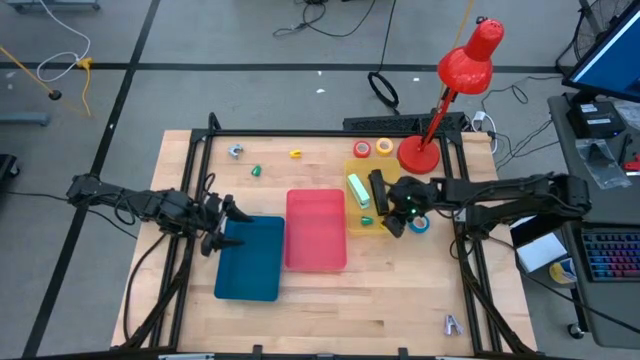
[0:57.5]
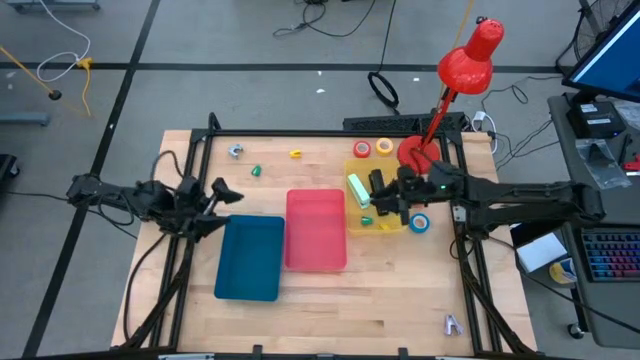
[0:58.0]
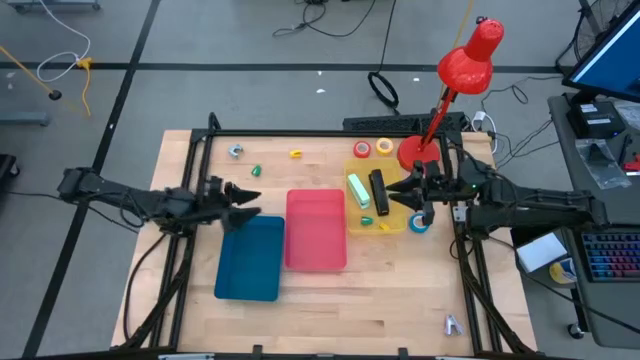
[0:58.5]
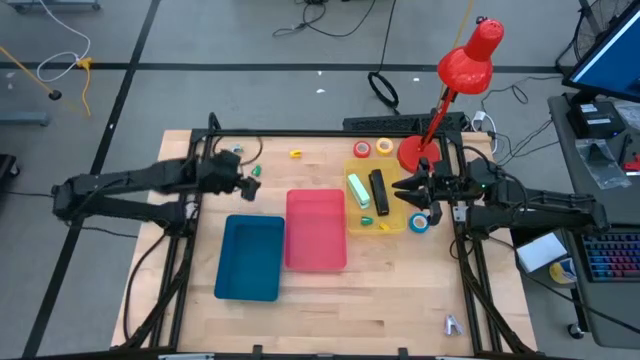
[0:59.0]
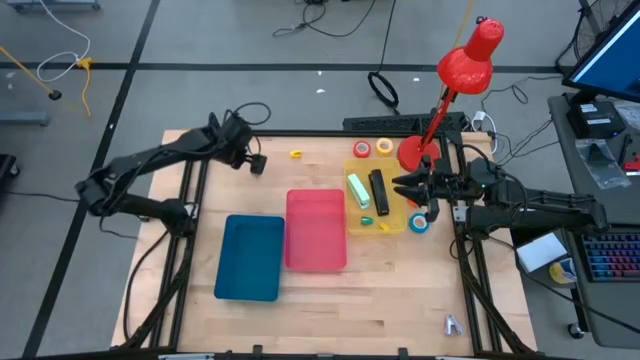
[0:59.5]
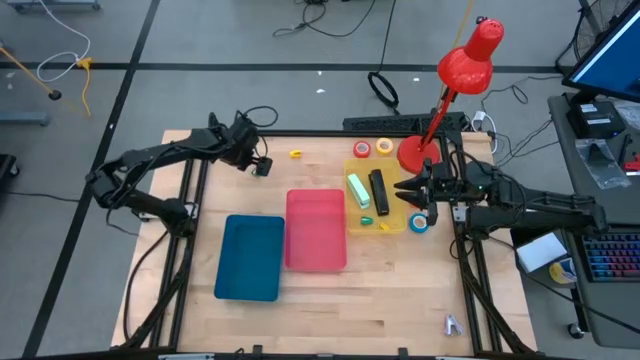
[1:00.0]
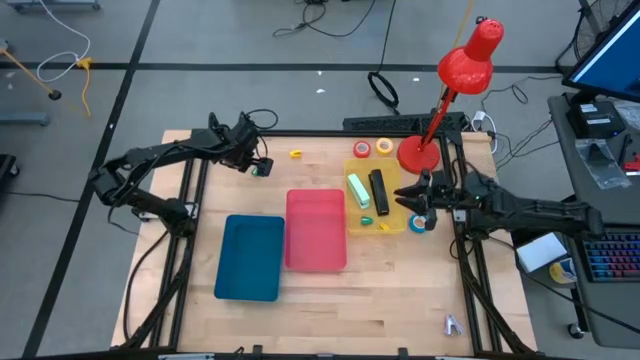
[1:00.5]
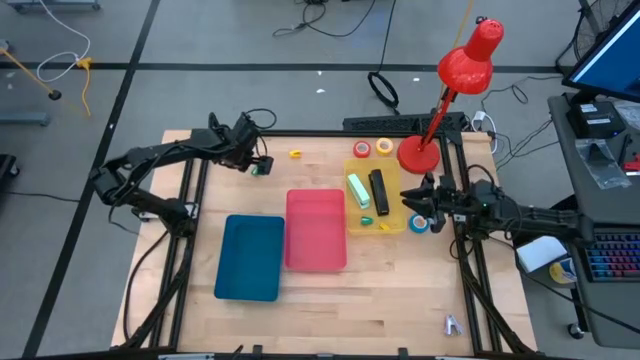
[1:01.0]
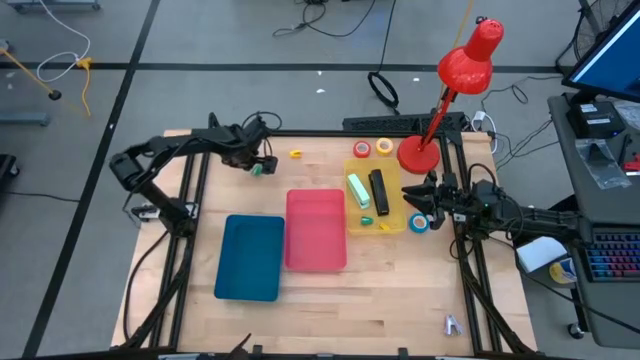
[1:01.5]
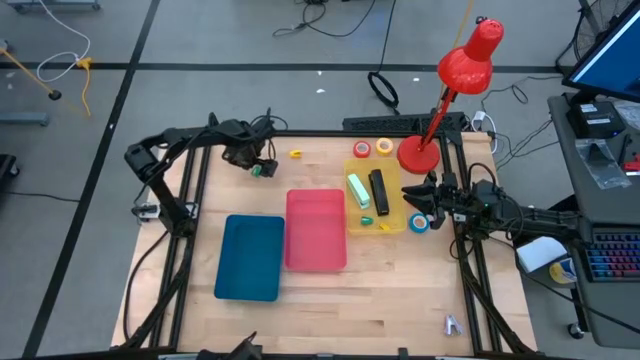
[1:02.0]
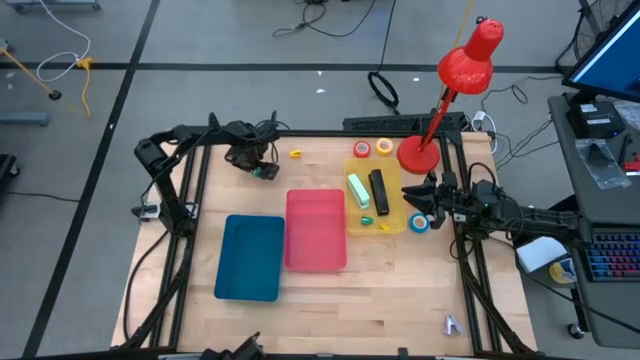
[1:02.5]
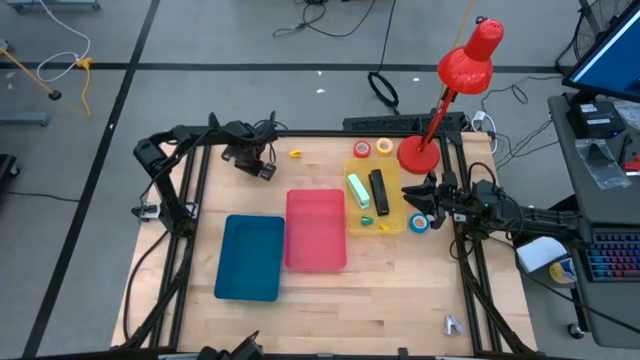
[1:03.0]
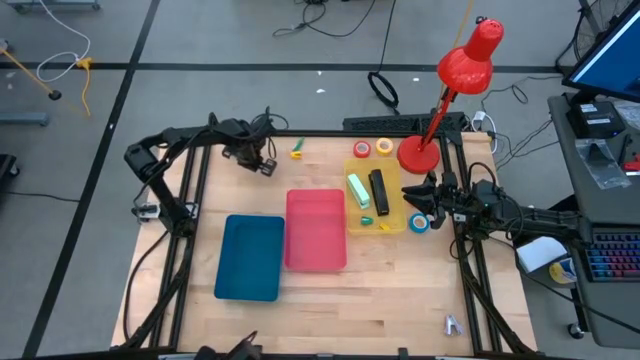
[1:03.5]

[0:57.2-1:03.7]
Task: Pick and place Stapler, Stapler remover, tape
Put the green stapler into the yellow bin

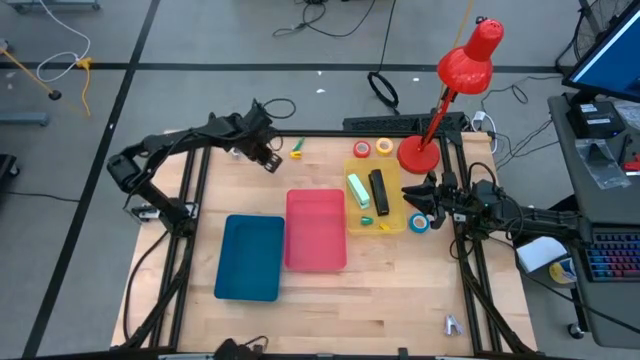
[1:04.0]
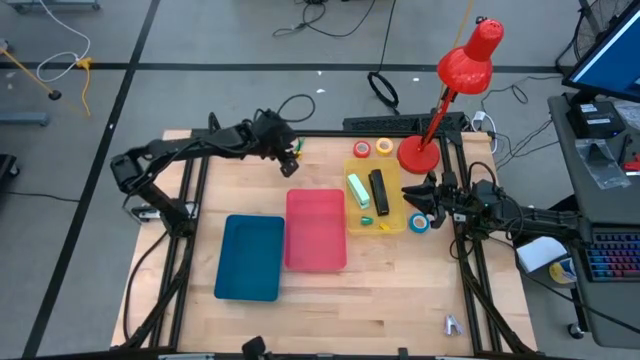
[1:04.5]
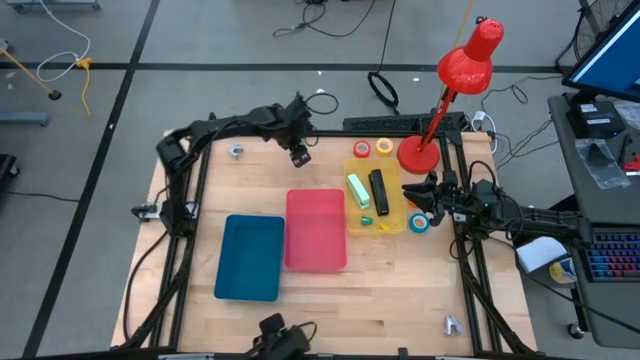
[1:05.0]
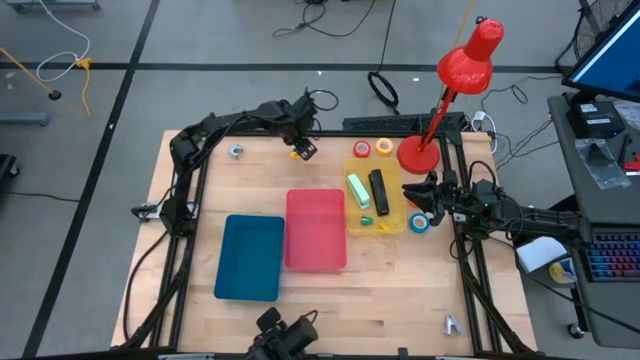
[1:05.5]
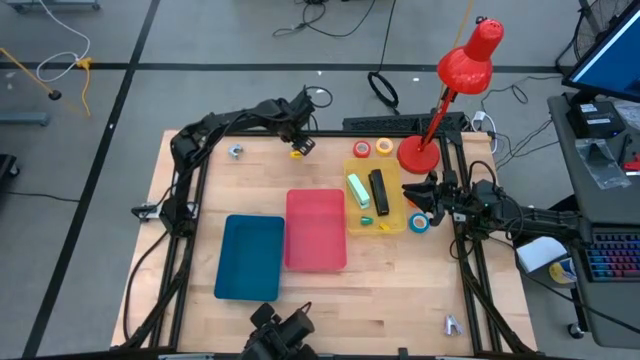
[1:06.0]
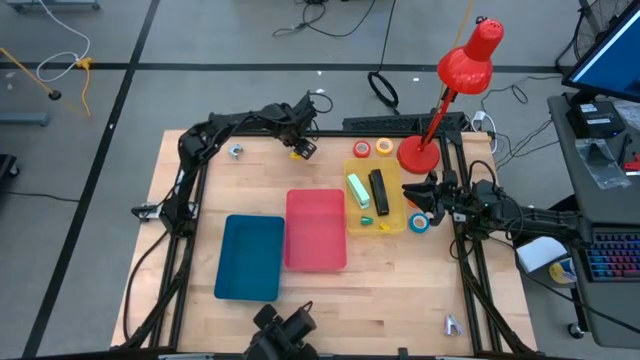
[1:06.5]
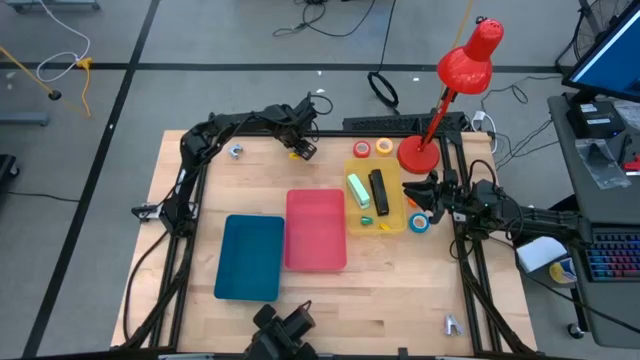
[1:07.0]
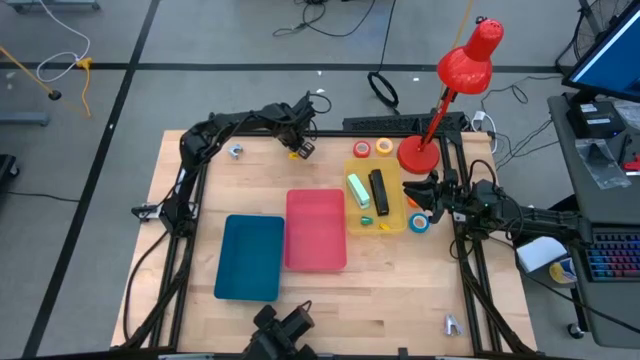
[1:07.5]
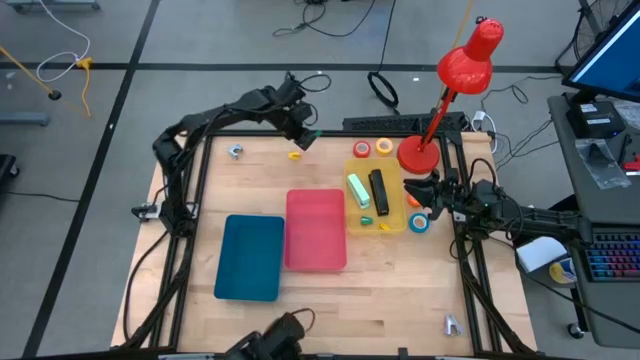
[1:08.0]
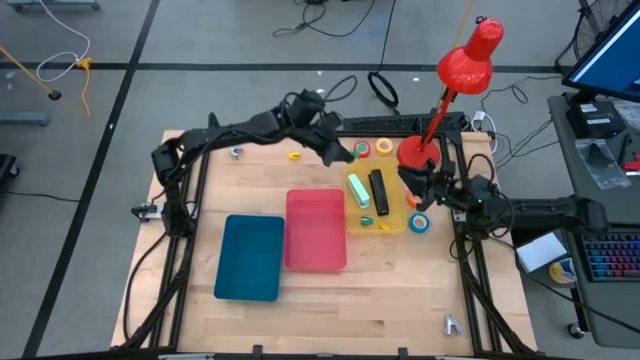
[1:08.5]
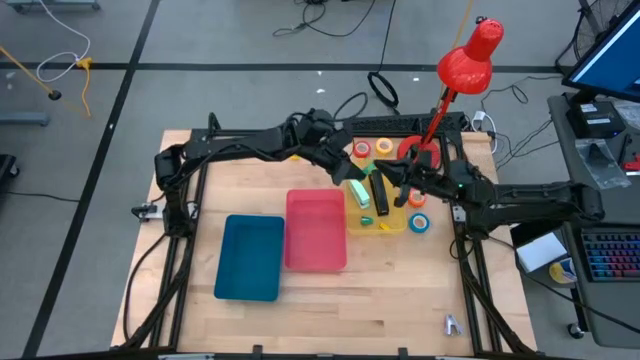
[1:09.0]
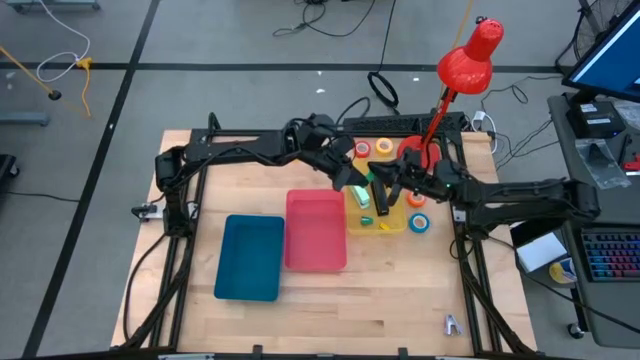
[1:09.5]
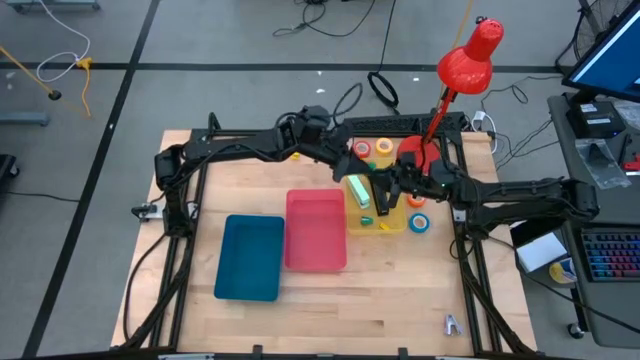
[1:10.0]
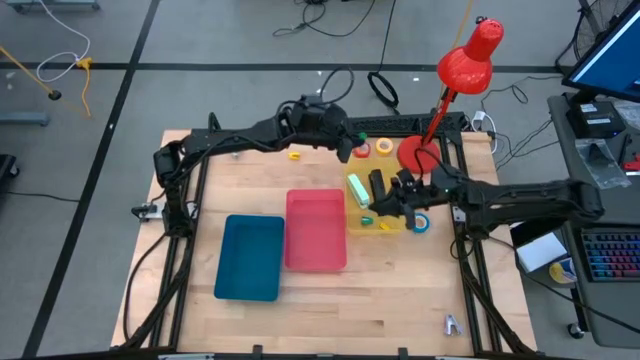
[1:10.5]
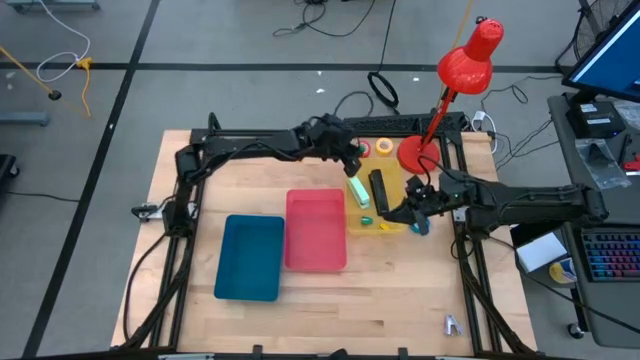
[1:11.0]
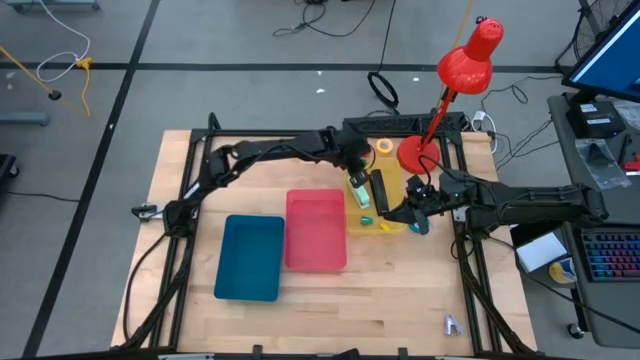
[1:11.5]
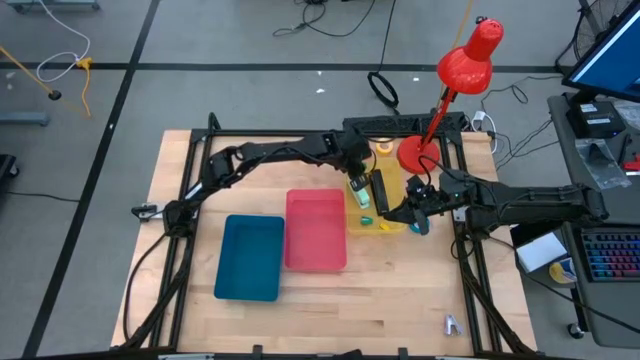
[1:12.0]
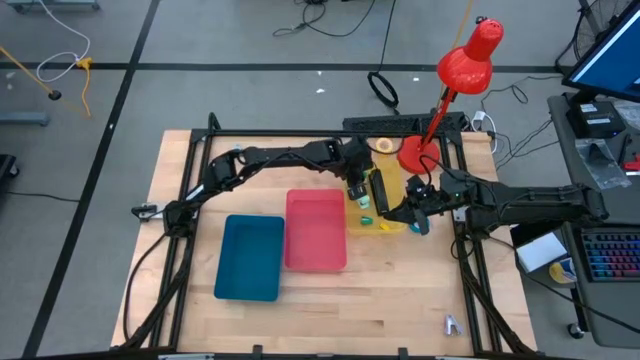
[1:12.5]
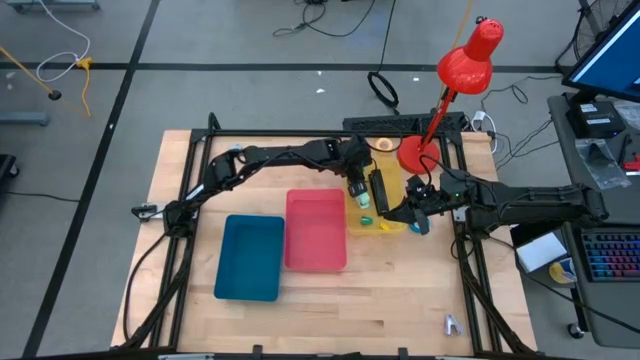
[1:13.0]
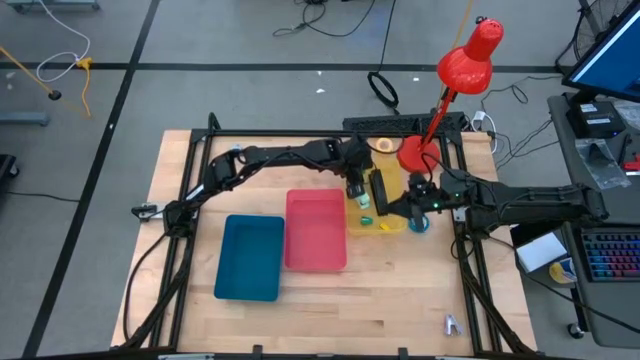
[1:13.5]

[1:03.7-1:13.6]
Put the green stapler into the yellow bin

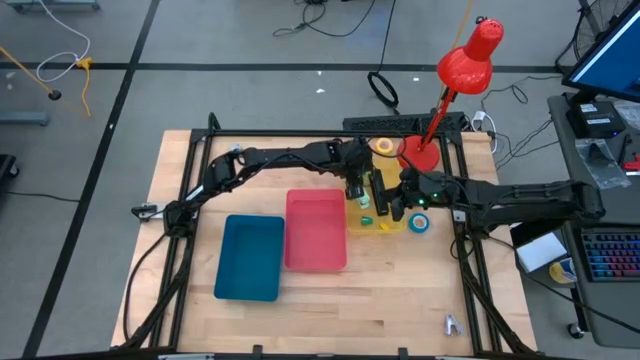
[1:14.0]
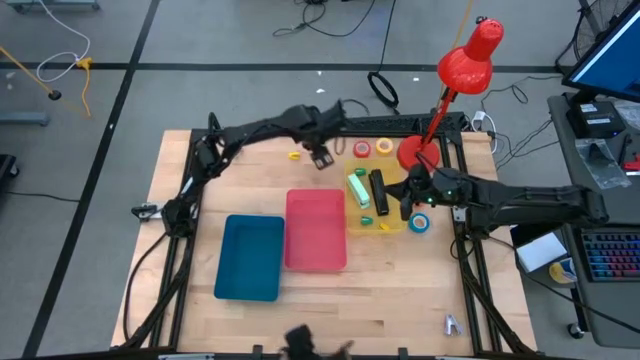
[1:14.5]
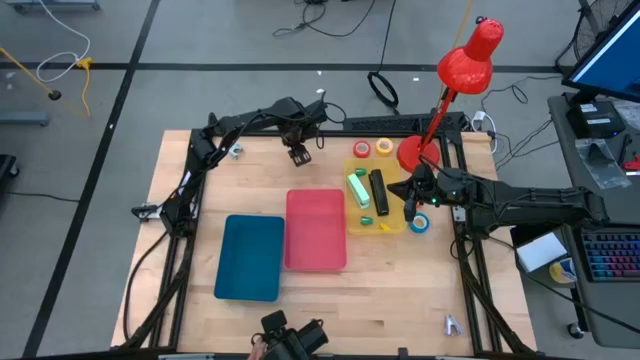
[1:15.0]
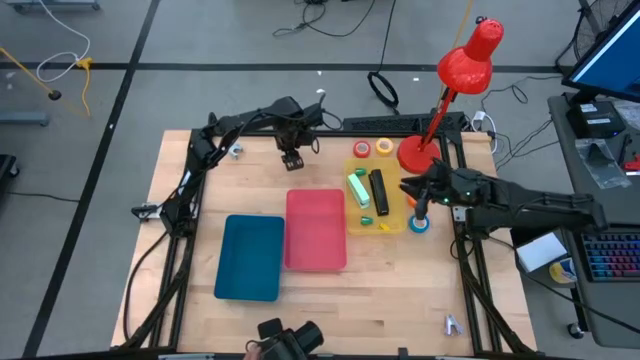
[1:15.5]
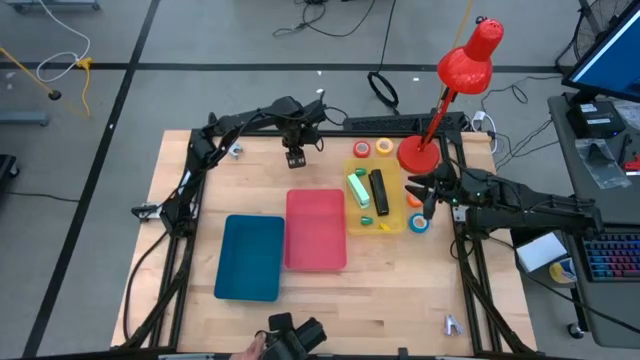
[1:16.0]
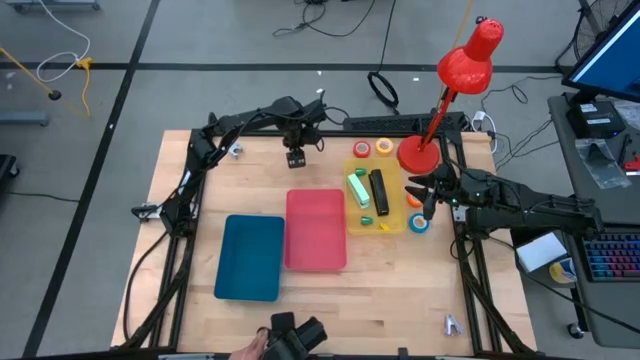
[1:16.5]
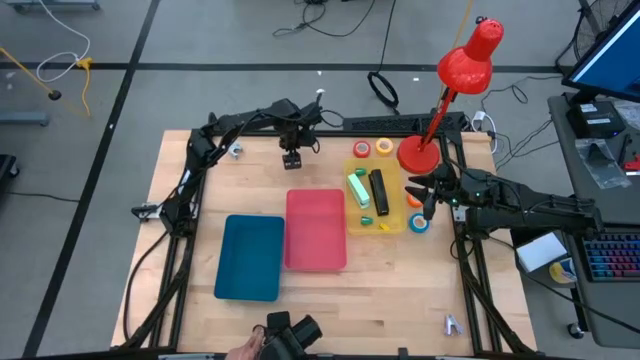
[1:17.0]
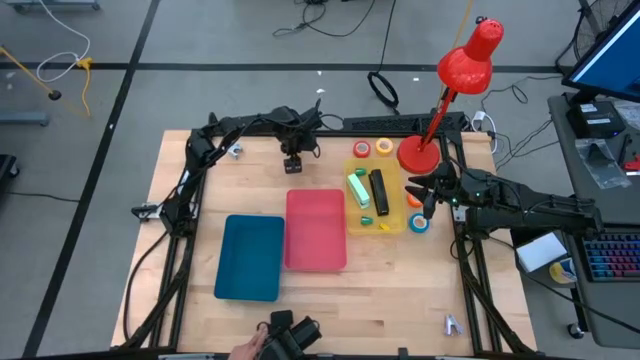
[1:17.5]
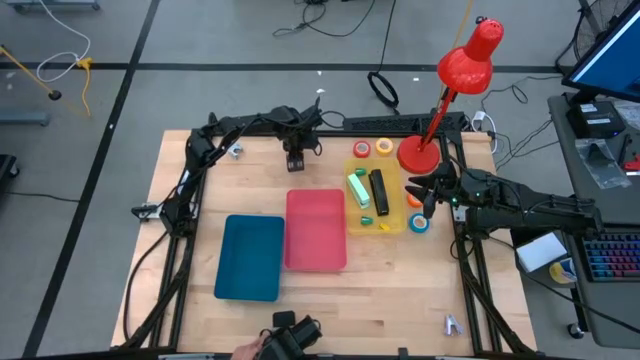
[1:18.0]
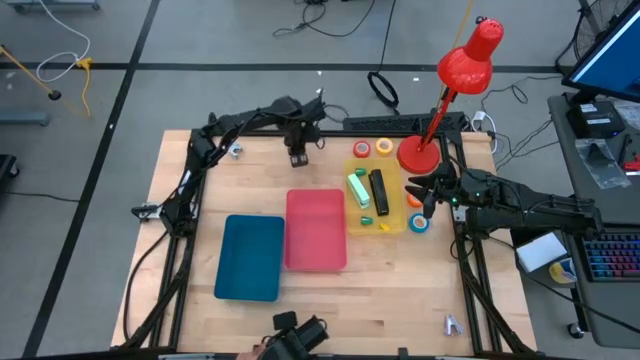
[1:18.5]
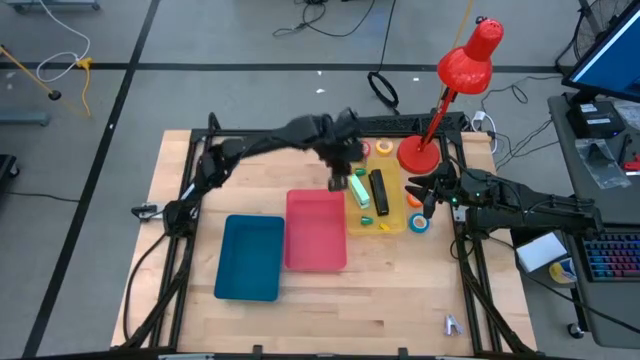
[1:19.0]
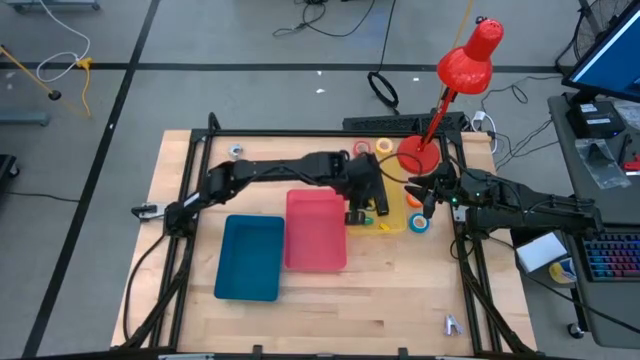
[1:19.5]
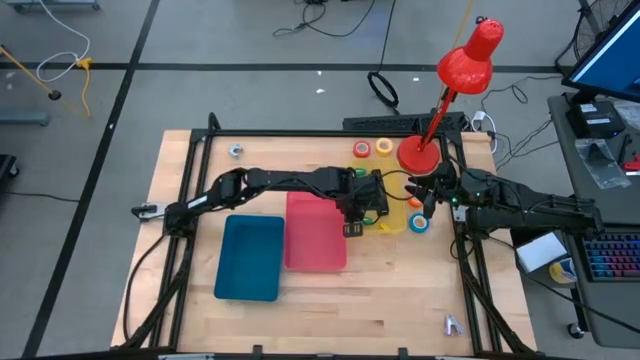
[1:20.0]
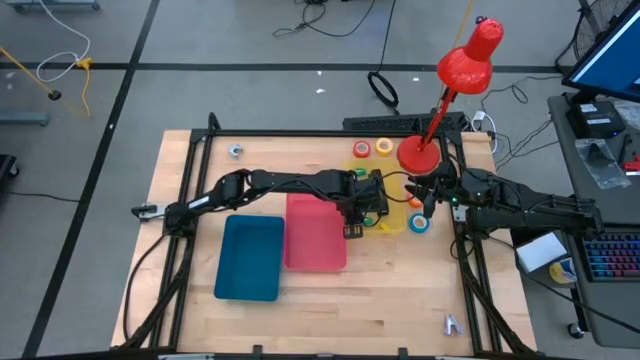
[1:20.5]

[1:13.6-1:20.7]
Put the yellow stapler into the yellow bin
